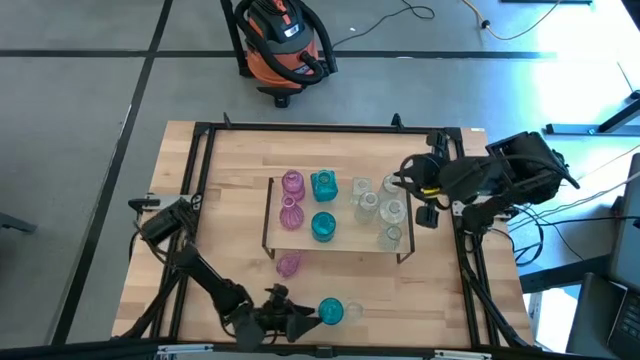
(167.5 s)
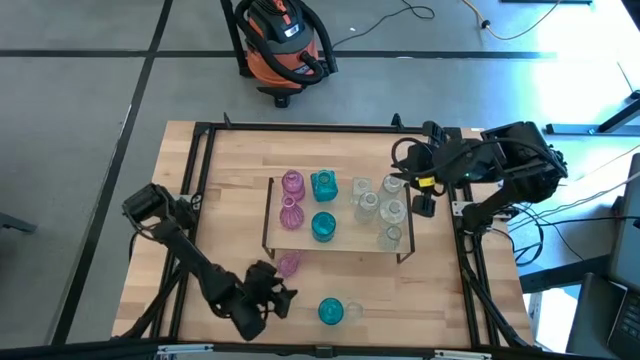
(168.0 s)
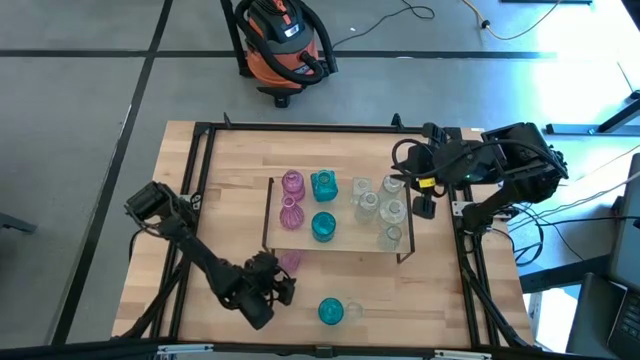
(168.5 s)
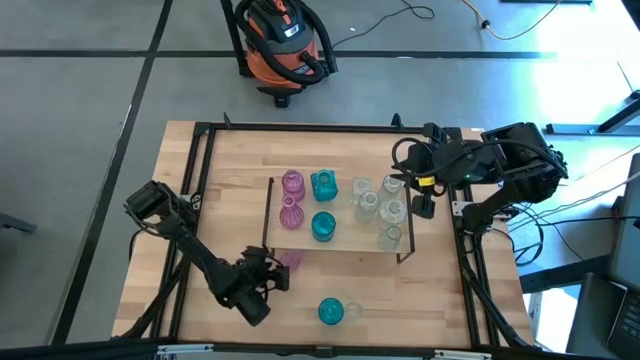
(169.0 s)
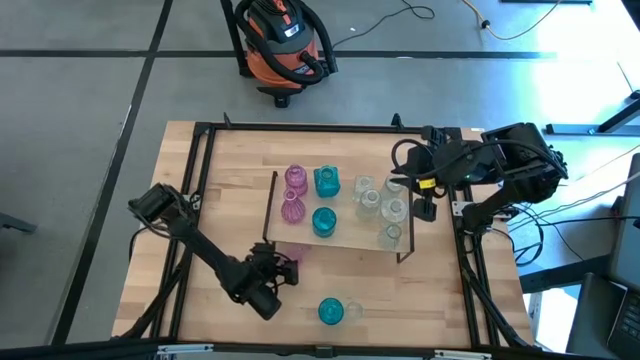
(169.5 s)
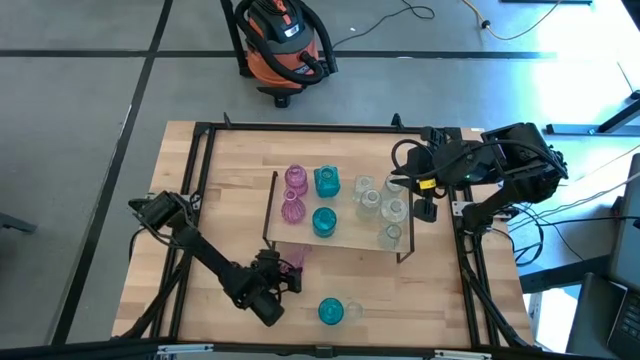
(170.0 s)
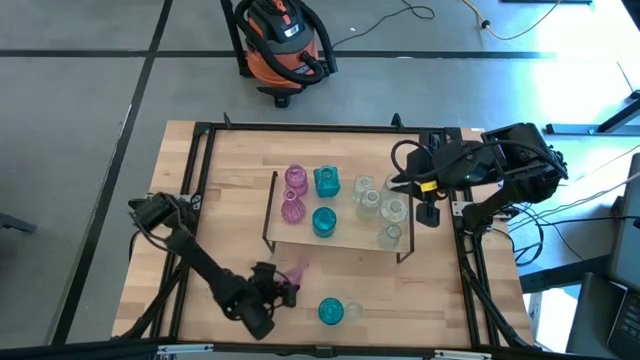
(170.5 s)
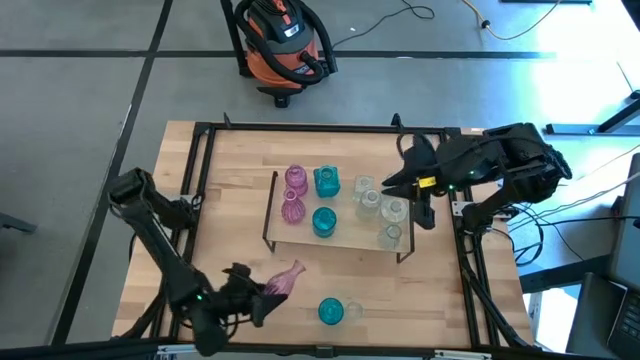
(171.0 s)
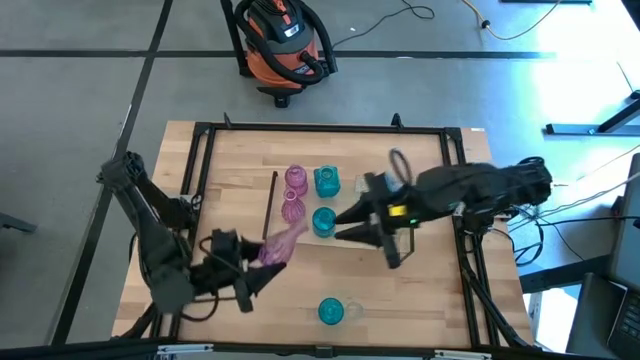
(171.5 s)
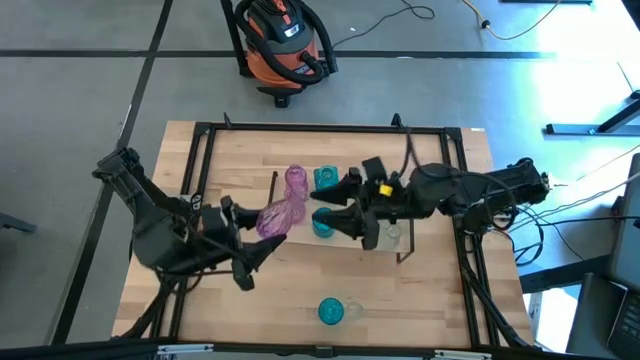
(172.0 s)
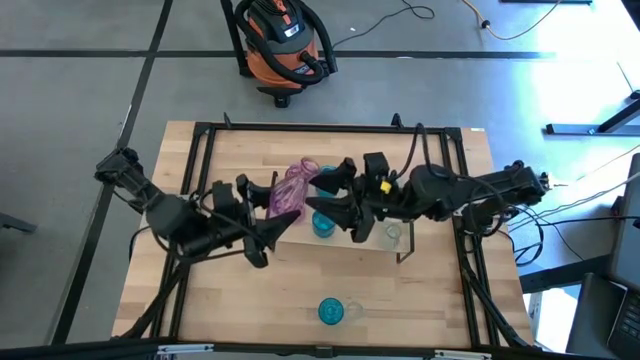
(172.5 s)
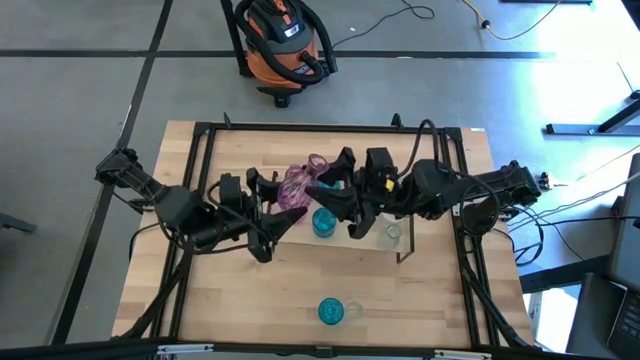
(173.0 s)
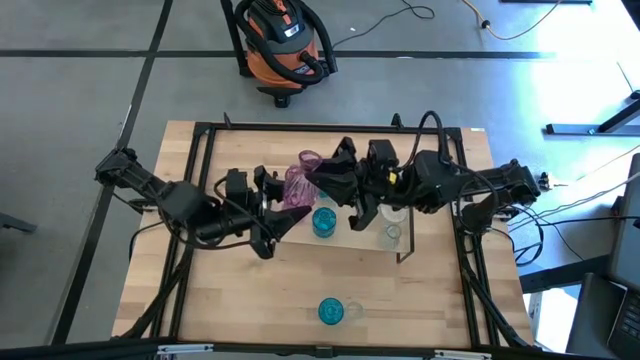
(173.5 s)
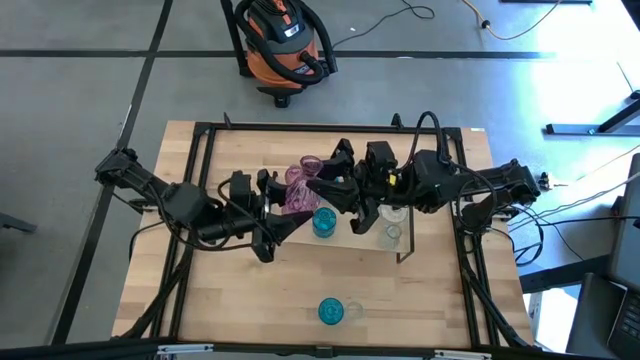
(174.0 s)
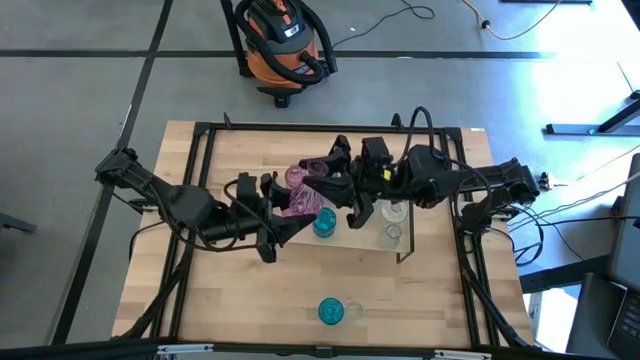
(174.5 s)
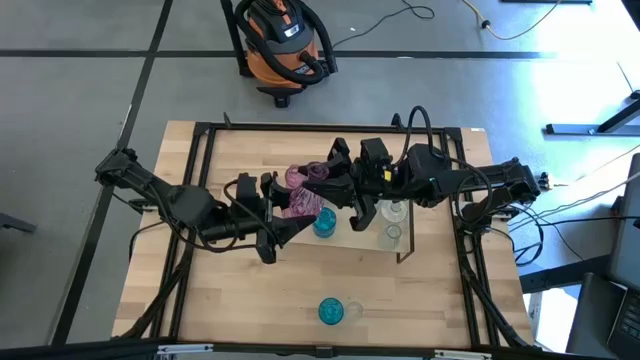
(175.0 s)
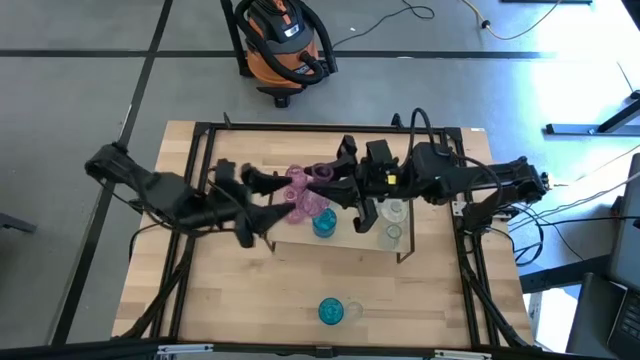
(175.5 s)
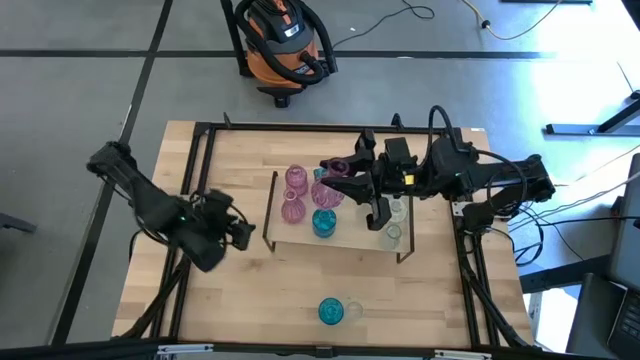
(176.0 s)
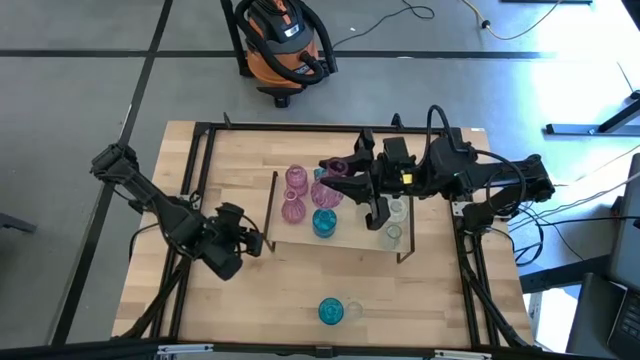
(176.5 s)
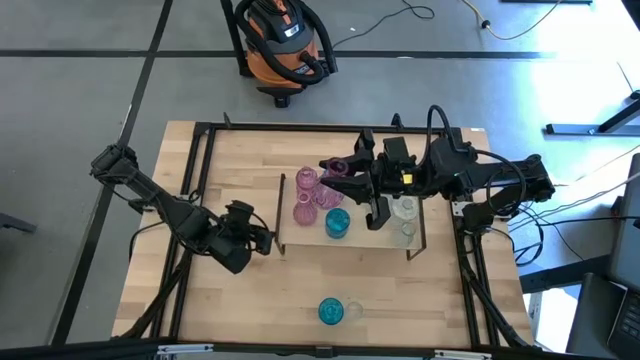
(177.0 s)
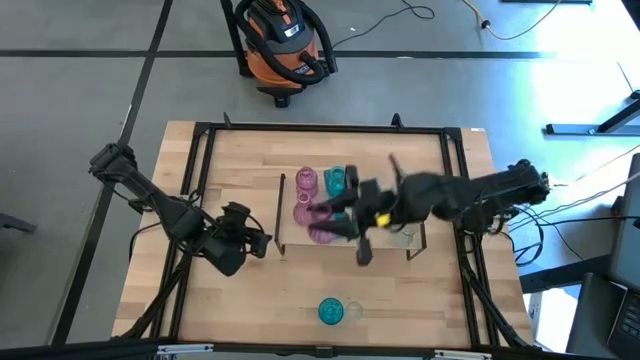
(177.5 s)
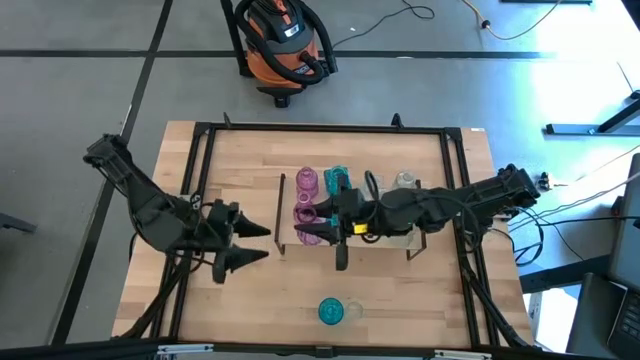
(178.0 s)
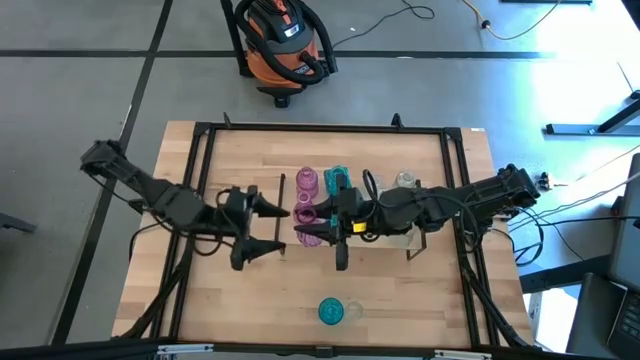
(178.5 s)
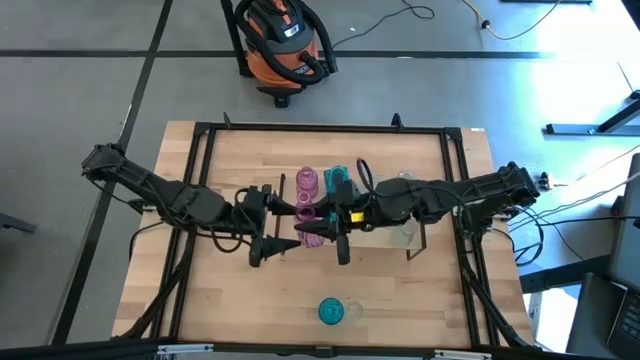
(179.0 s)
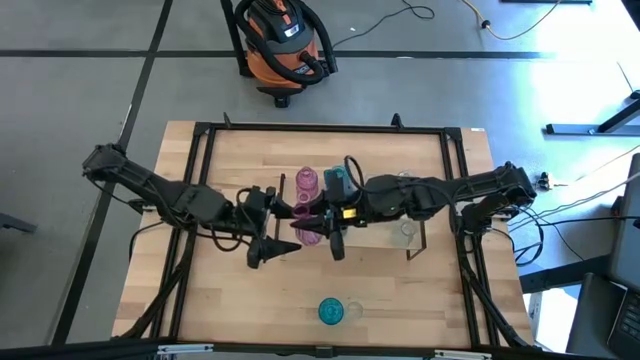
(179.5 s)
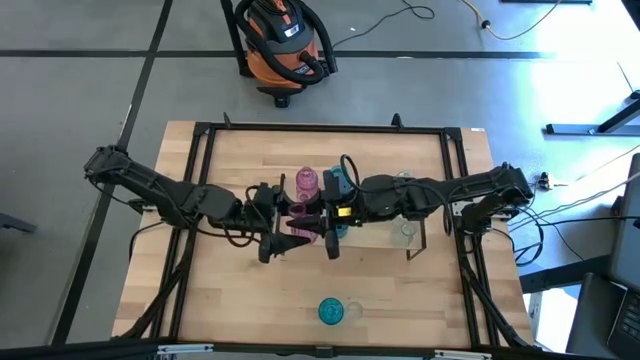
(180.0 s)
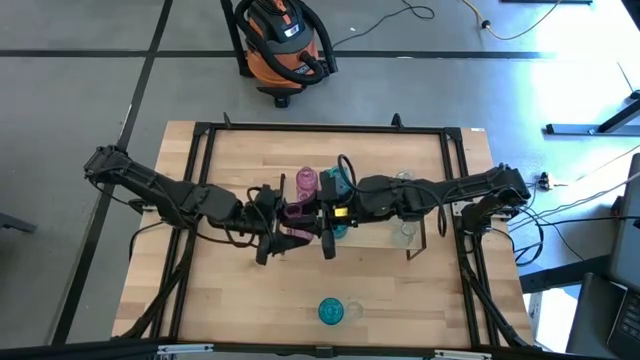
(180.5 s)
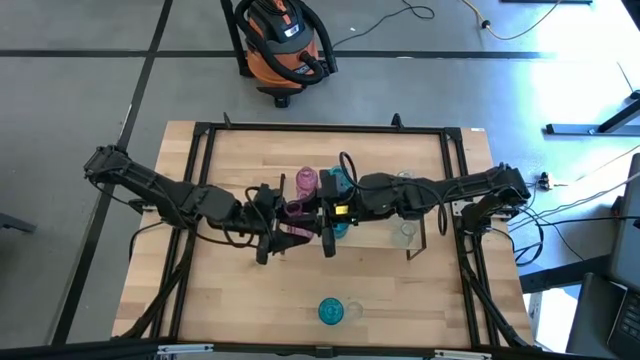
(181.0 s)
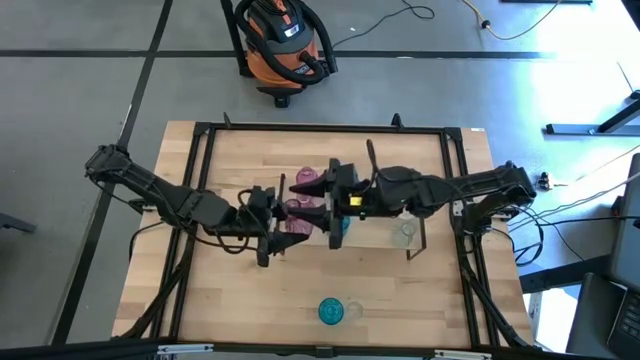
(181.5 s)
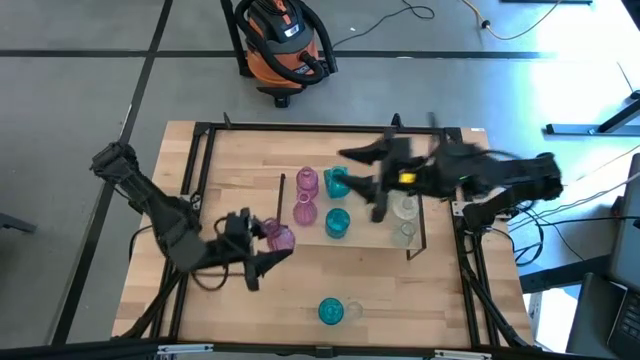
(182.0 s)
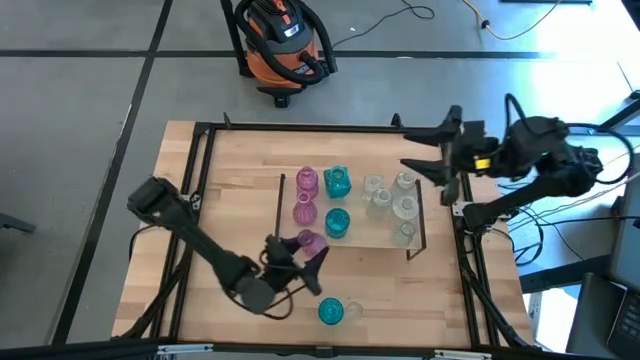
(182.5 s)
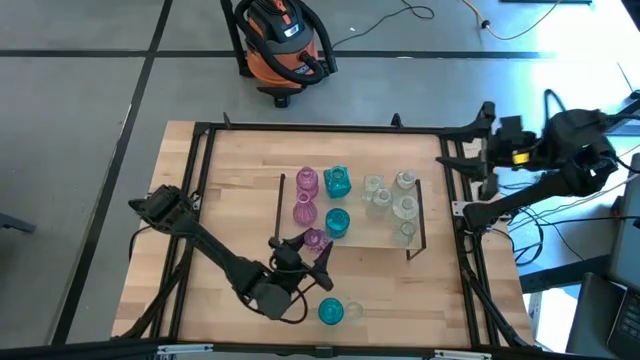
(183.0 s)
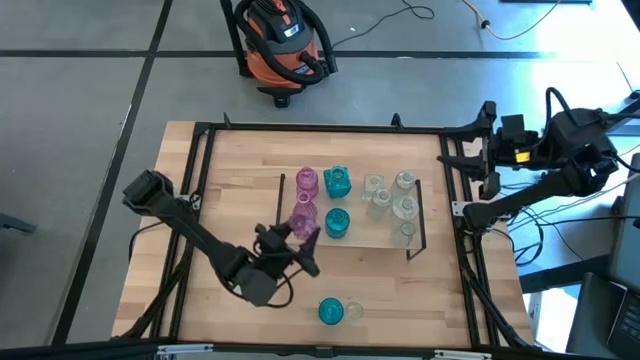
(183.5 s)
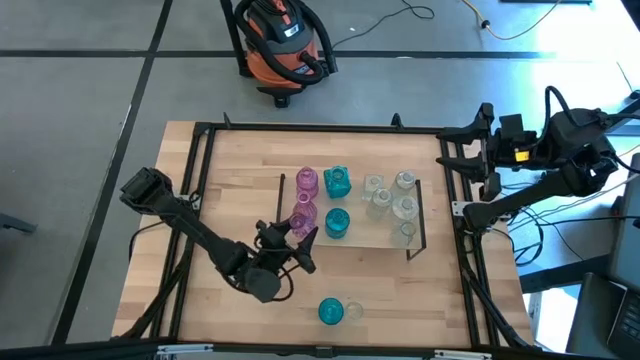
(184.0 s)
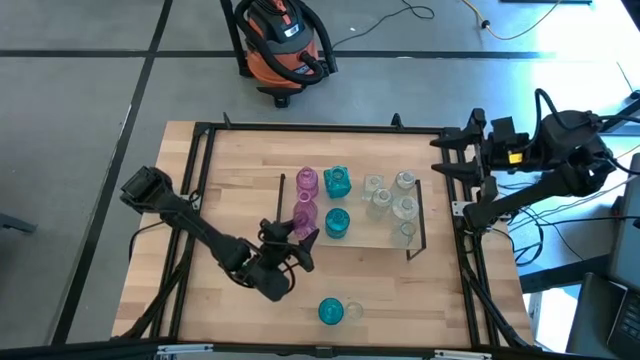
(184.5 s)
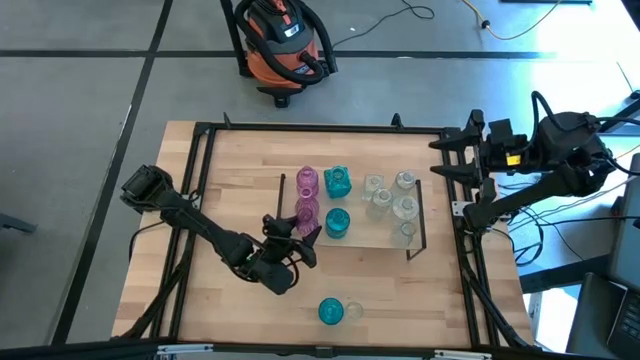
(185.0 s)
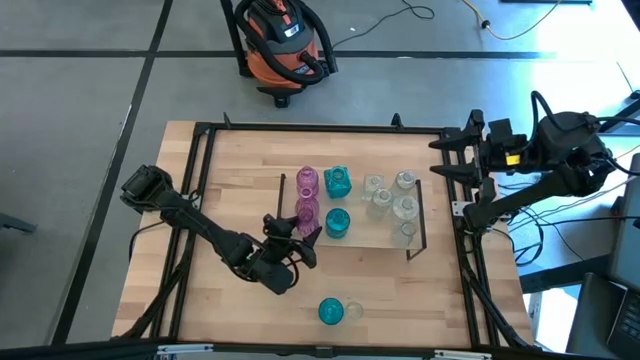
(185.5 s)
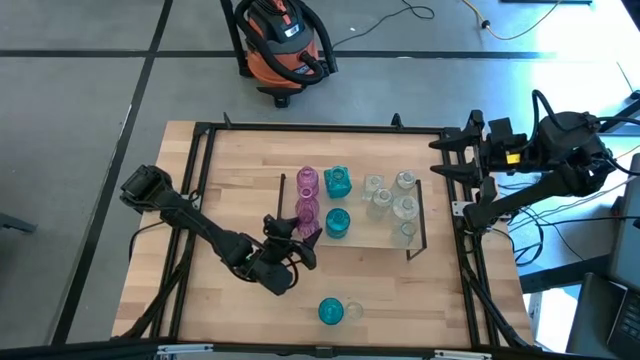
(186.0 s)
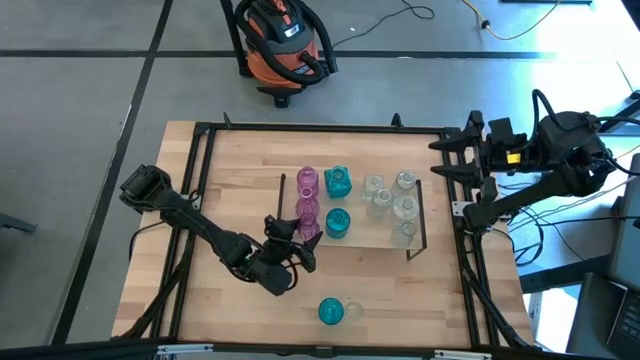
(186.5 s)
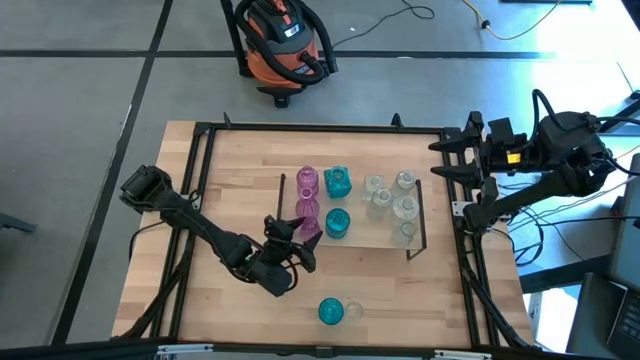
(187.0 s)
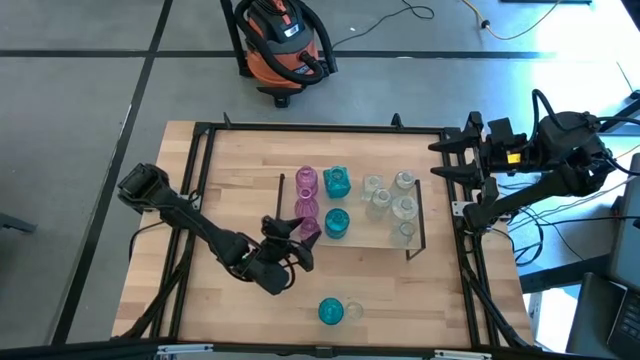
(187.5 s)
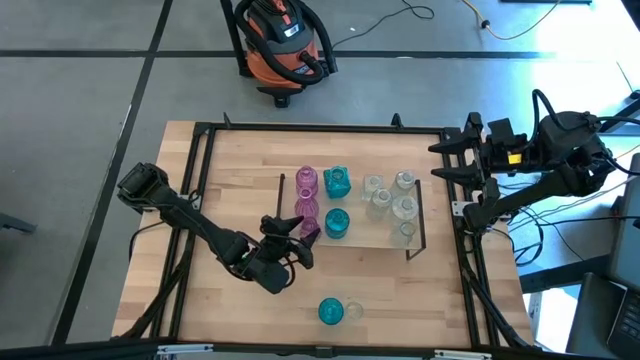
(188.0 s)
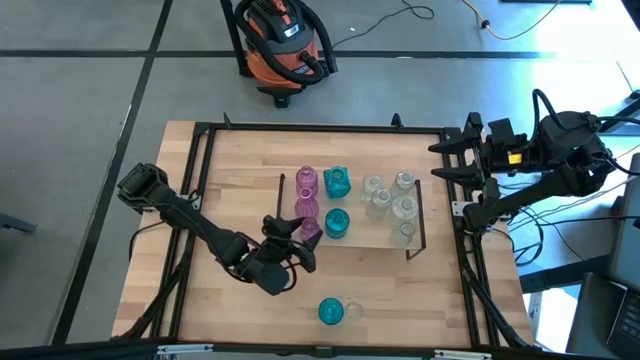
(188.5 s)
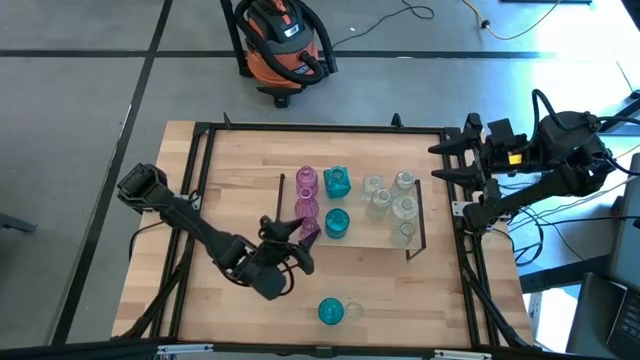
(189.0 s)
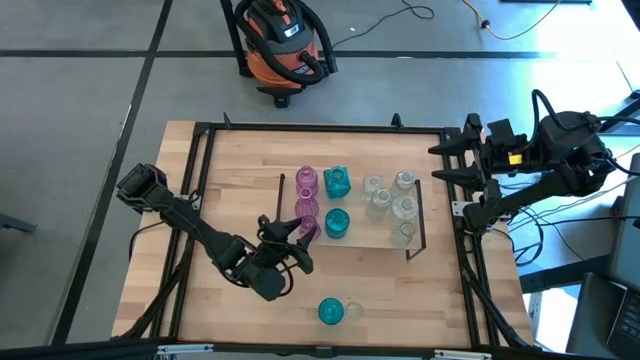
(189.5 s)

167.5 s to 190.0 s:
Task: sort vases onto shelf
Put the violet vase on the shelf aligned with the other violet vase
